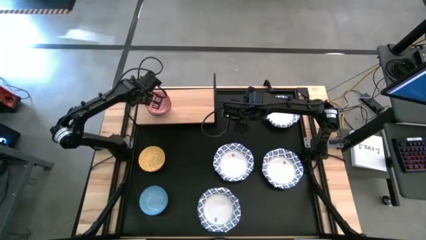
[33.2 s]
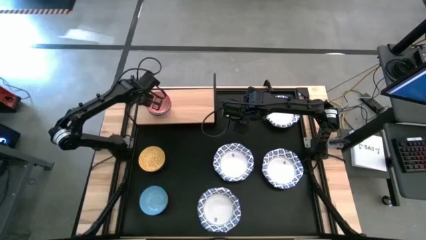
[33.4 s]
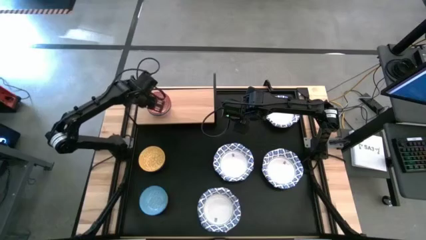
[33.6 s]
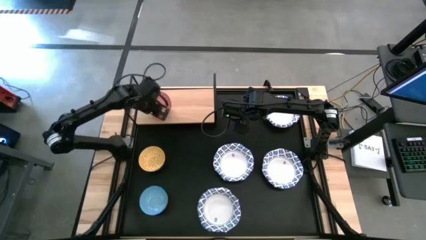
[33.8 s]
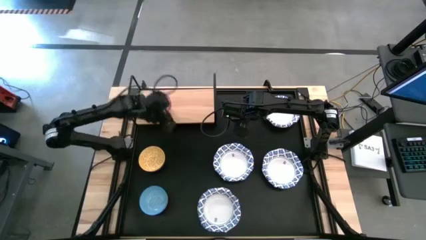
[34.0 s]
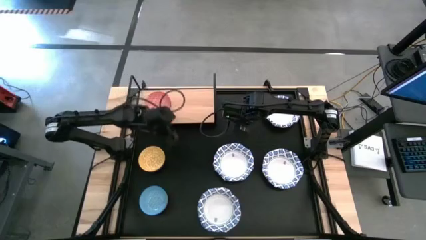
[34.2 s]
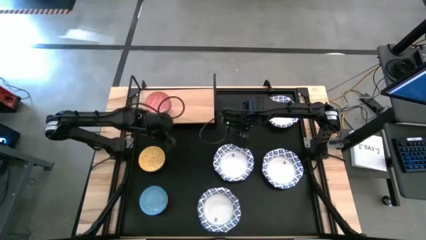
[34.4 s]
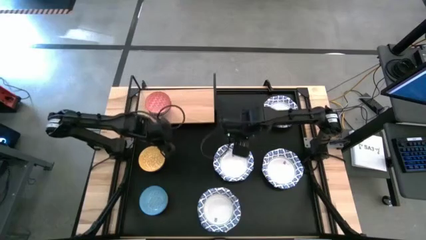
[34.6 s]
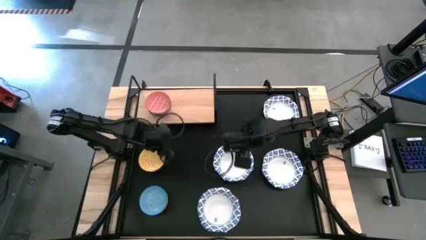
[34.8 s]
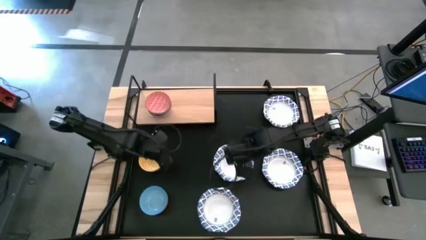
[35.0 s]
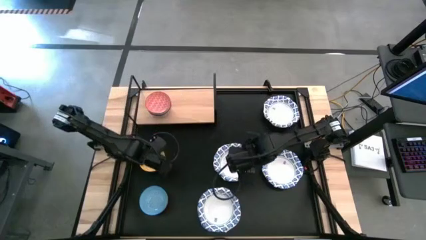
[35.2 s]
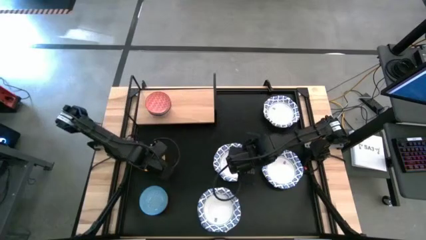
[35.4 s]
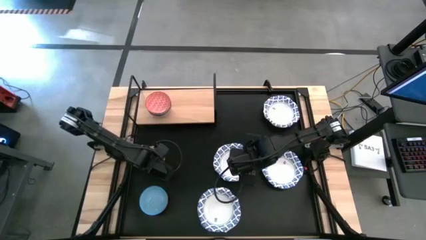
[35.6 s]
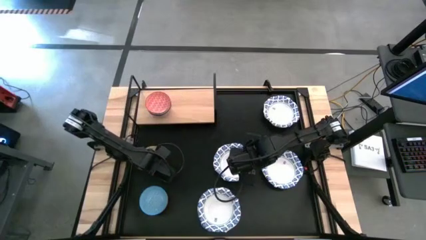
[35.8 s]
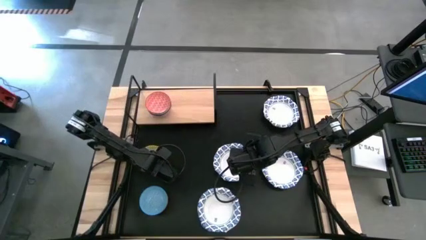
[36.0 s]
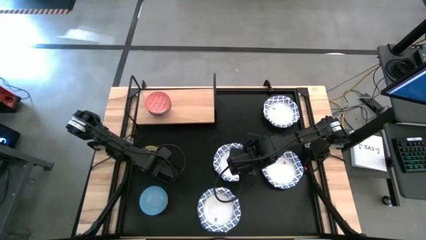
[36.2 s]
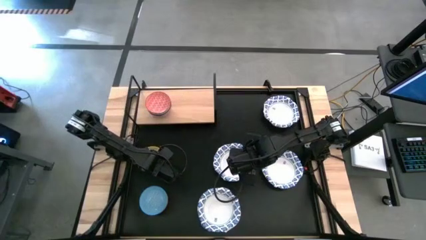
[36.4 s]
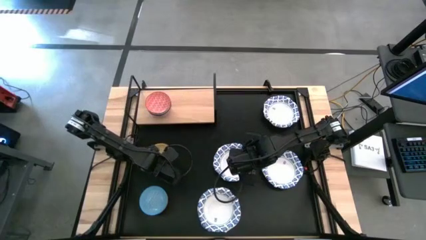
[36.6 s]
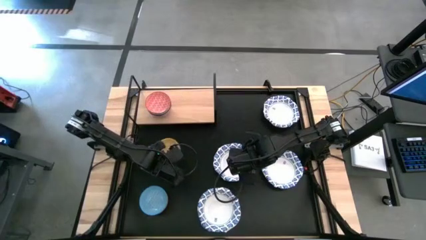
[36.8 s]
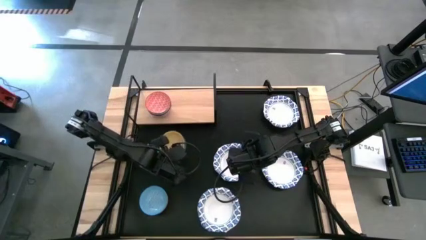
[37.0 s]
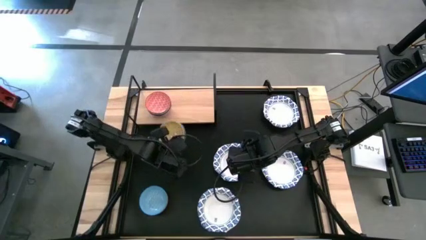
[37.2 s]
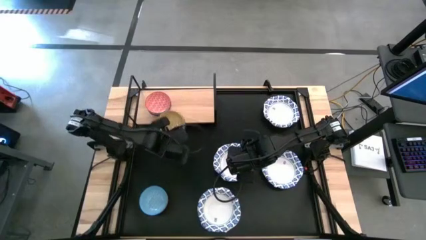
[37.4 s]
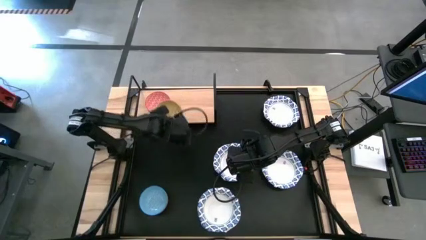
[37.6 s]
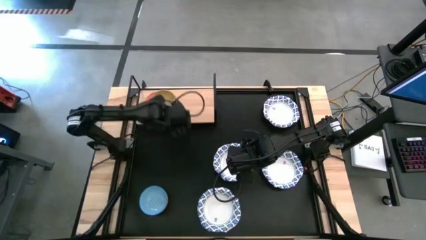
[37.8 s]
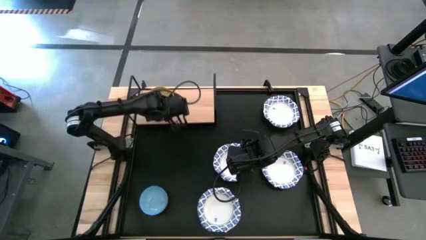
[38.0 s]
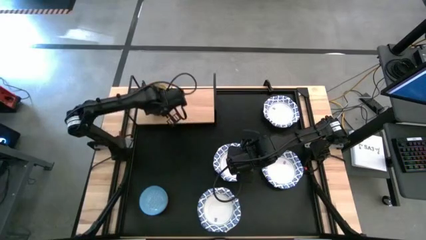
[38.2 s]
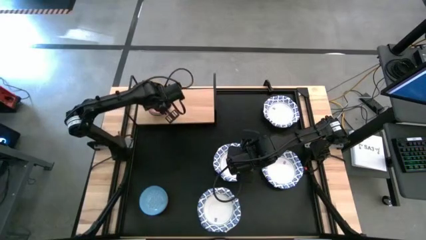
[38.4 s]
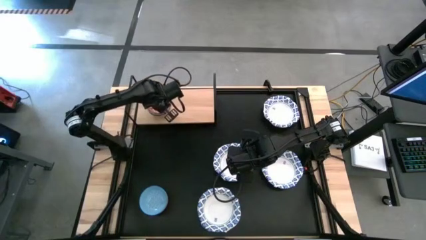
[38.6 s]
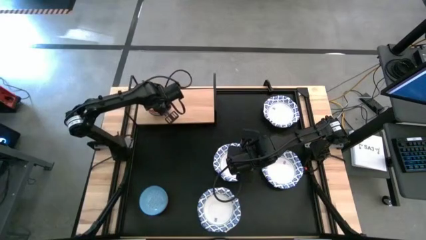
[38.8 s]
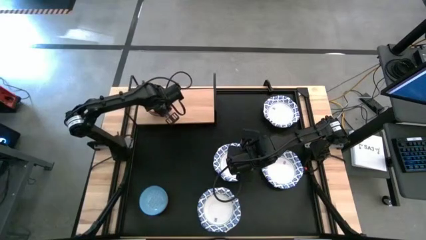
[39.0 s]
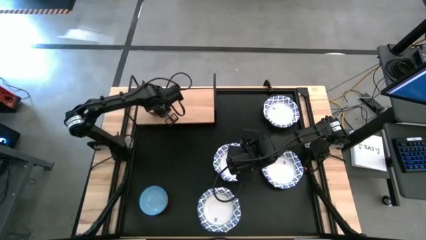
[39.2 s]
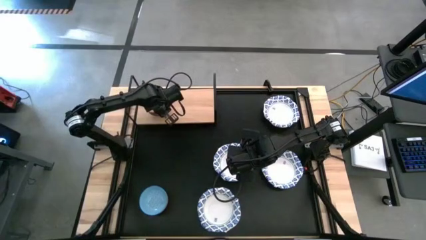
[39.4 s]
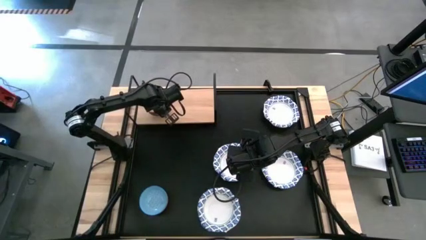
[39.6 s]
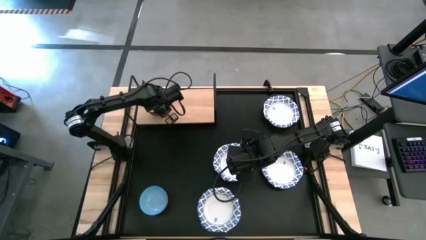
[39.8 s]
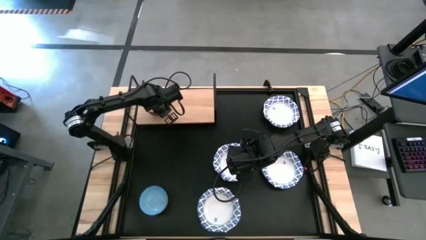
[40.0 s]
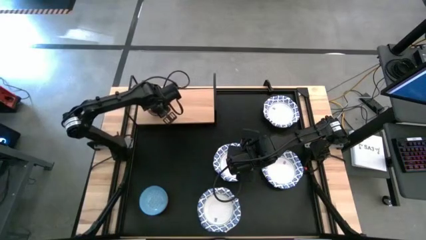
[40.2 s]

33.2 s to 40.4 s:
Task: Place and stack bowls onto a shelf
Stack the yellow bowl on top of the orange bowl on the shelf

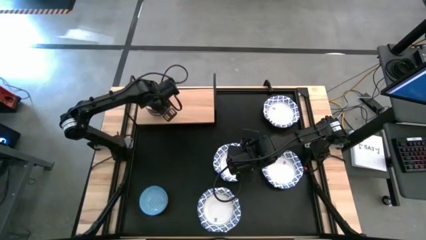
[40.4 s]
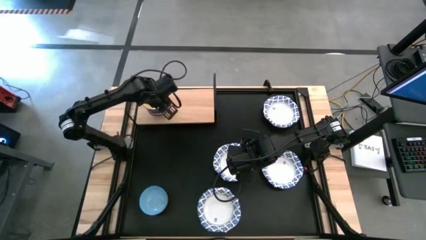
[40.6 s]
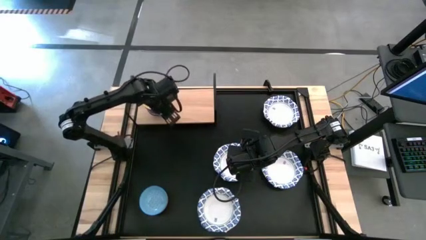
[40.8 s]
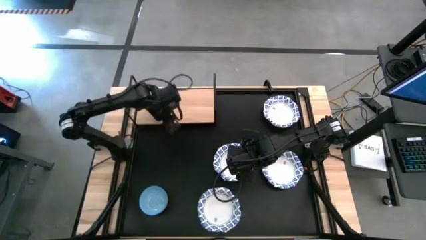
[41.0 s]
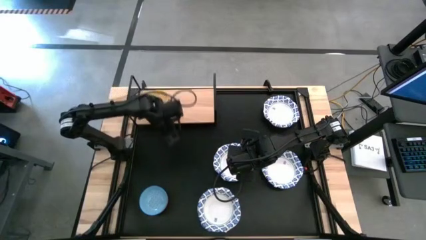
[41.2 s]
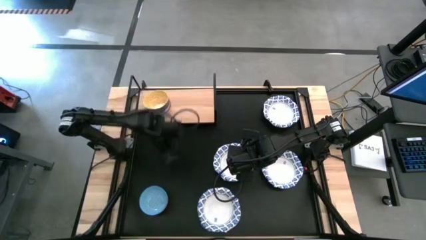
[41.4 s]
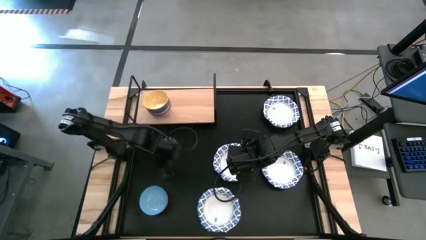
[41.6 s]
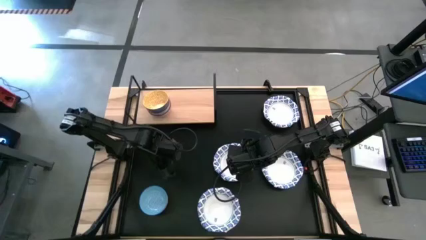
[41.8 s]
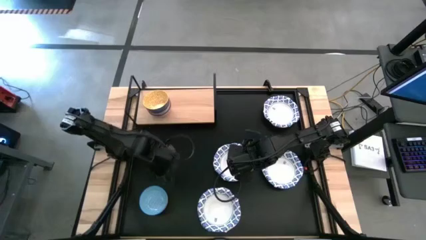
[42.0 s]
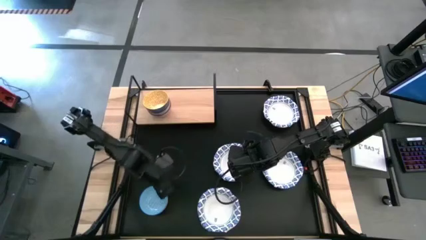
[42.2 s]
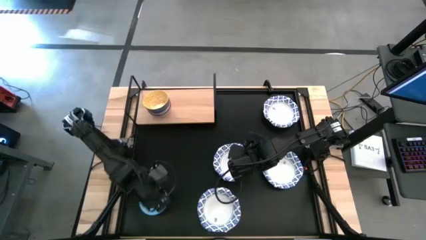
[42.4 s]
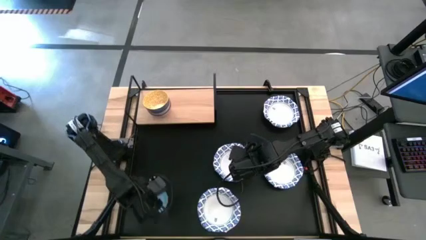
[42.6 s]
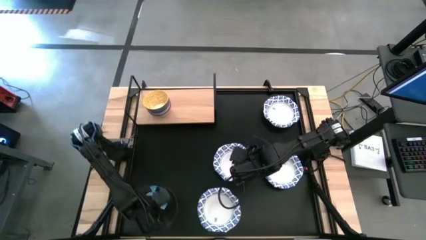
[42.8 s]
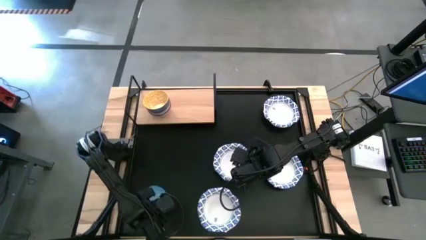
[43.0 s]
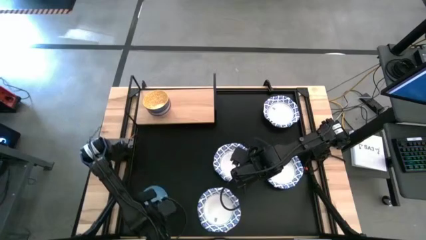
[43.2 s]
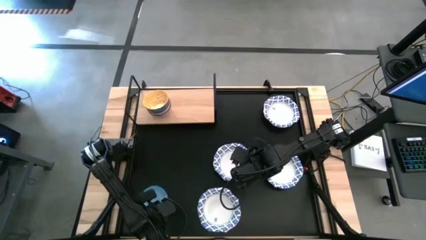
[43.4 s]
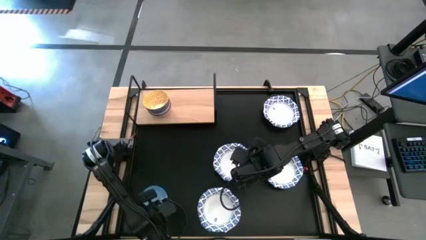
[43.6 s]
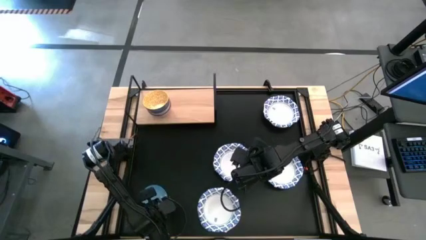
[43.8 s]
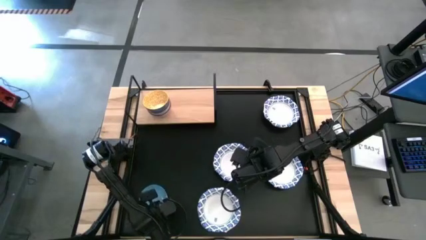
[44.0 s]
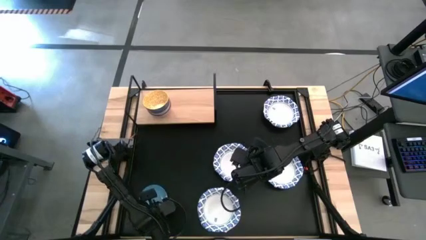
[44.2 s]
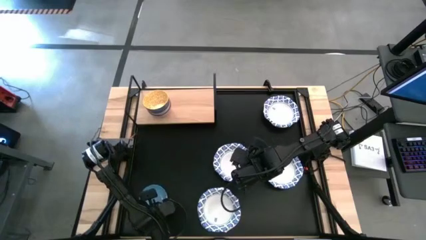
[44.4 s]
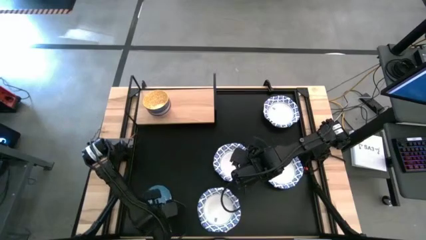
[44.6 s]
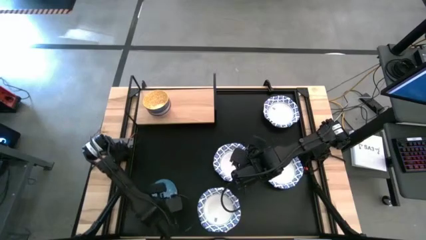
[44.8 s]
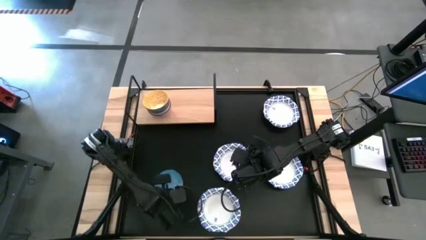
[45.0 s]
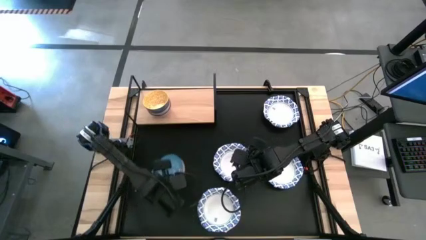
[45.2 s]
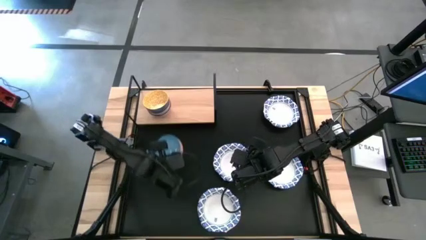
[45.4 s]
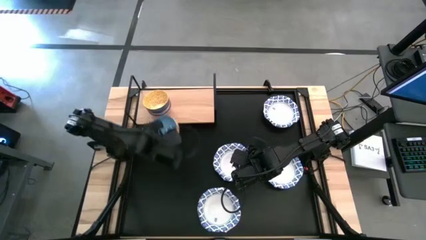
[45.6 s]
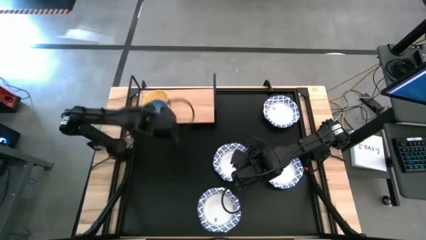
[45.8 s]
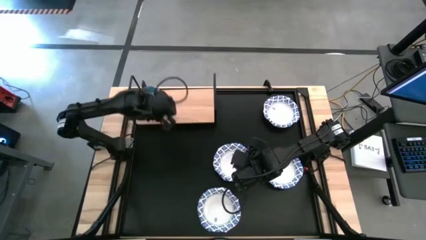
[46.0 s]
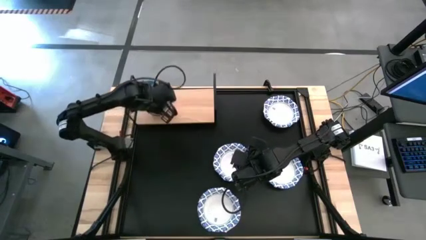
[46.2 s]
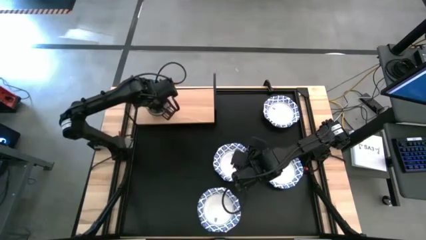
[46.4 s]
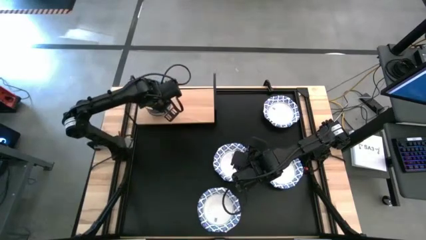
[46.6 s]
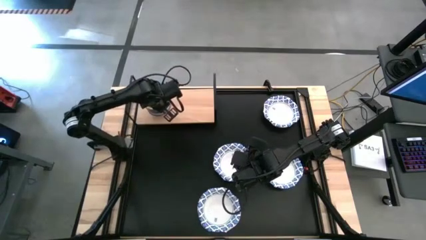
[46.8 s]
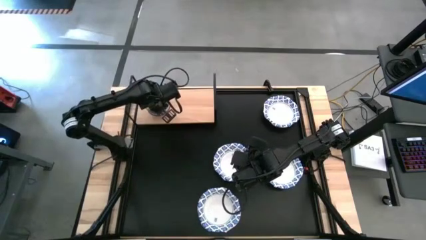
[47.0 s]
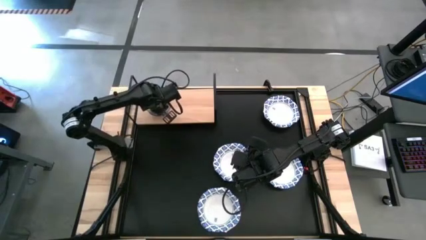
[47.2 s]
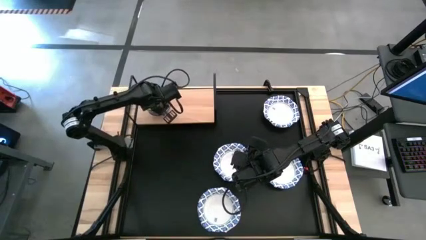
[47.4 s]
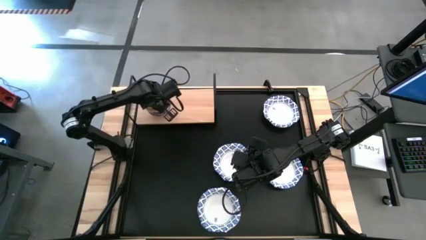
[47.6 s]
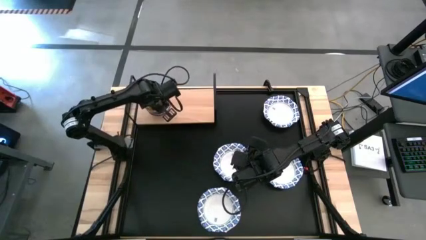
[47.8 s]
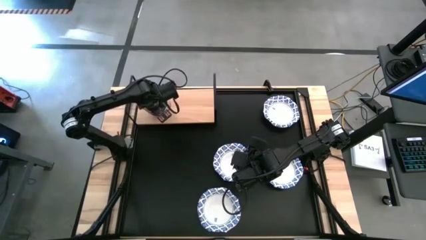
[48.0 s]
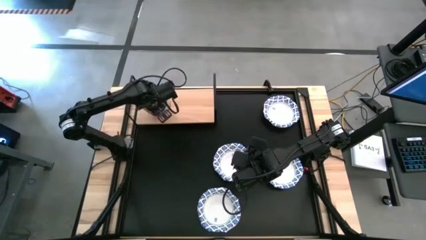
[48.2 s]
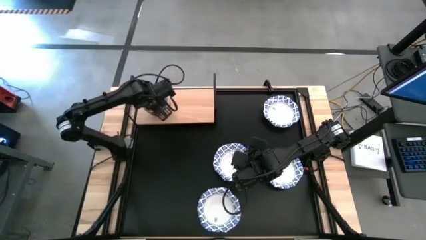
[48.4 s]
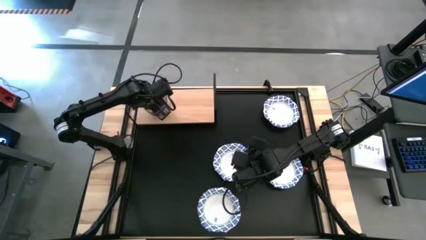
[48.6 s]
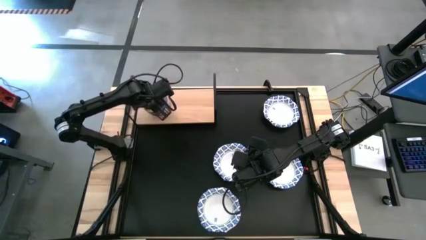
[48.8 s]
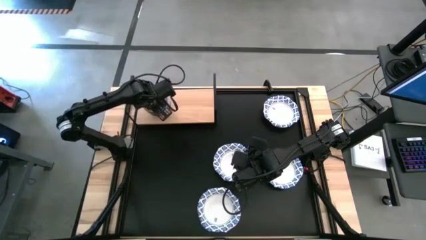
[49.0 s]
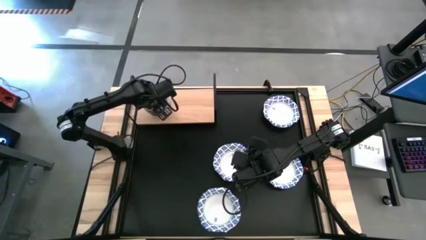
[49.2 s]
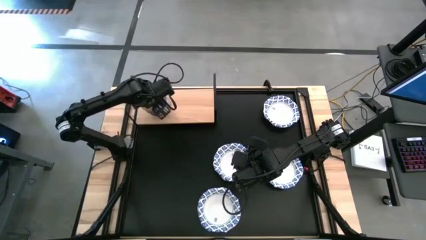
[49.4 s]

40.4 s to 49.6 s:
Stack the light blue bowl on top of the yellow bowl on the shelf
